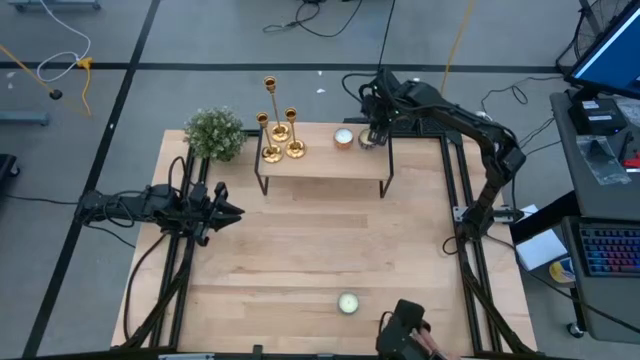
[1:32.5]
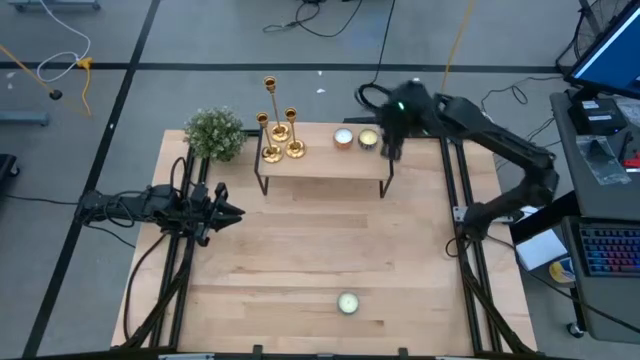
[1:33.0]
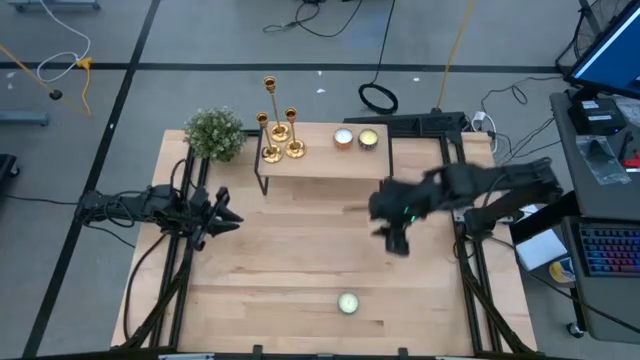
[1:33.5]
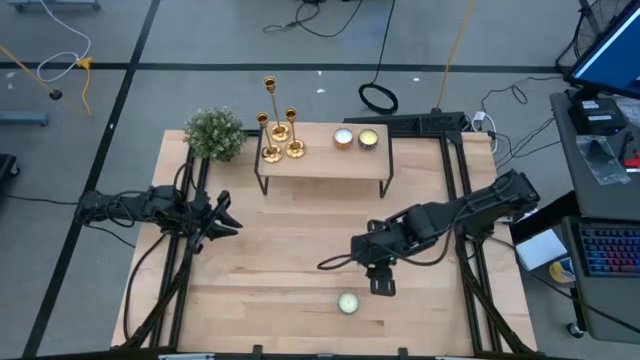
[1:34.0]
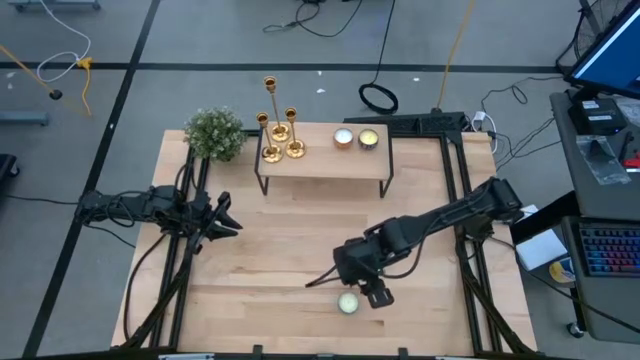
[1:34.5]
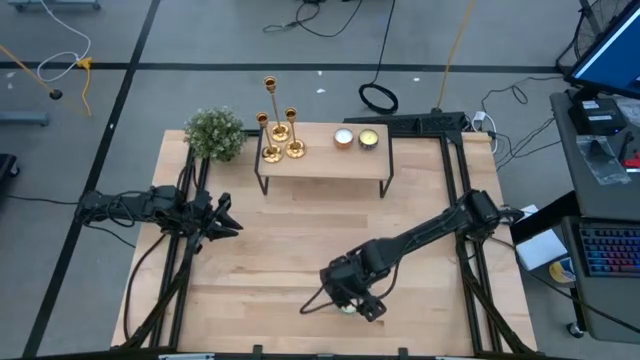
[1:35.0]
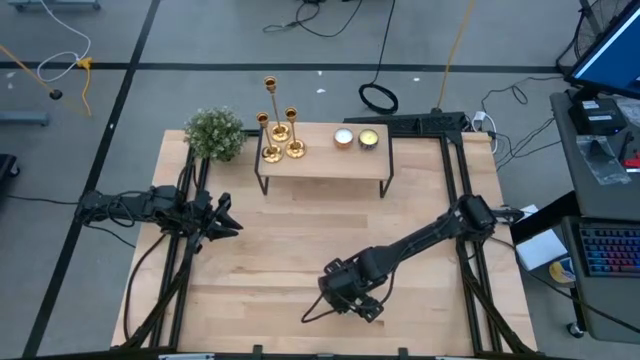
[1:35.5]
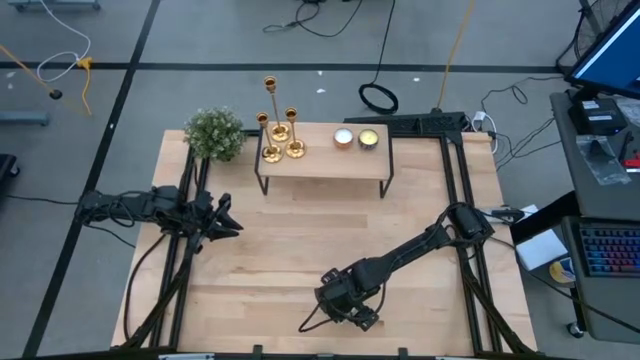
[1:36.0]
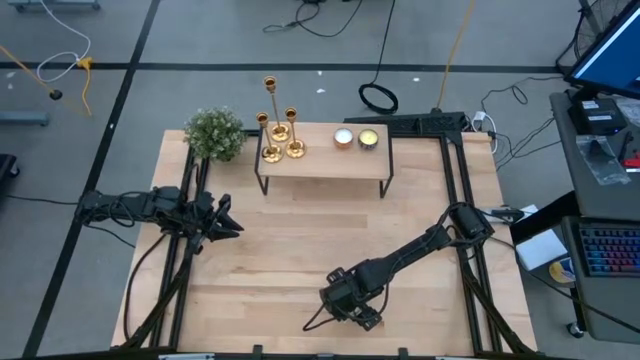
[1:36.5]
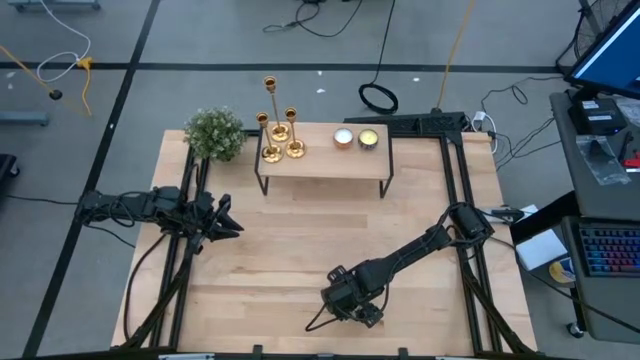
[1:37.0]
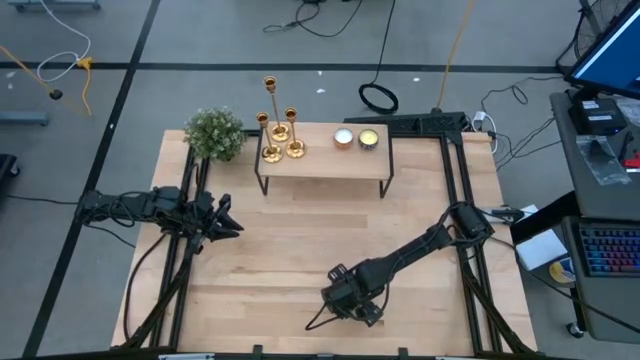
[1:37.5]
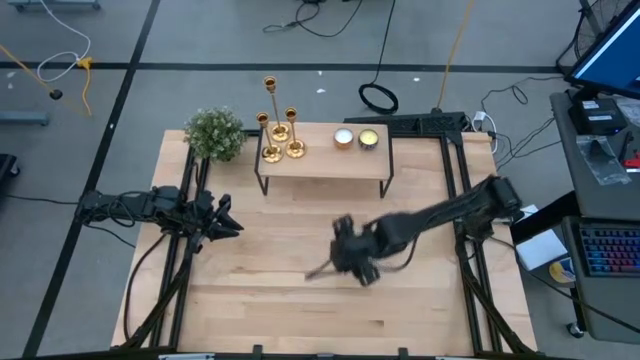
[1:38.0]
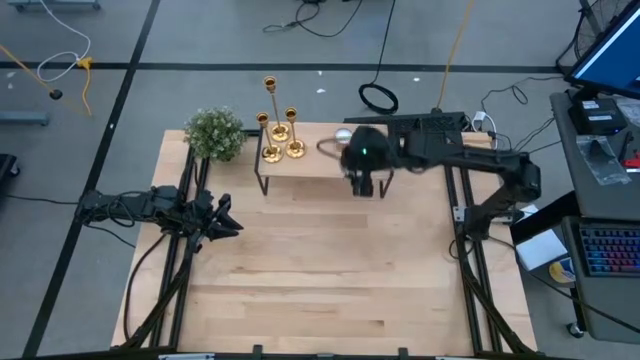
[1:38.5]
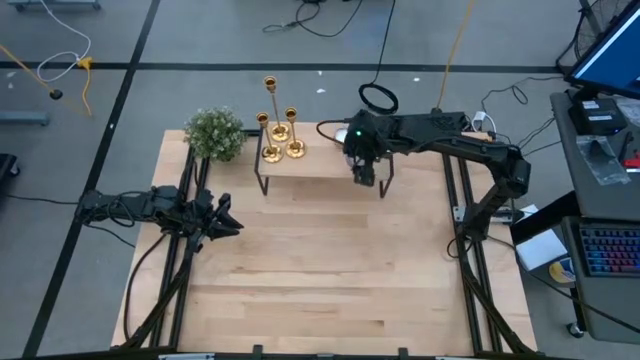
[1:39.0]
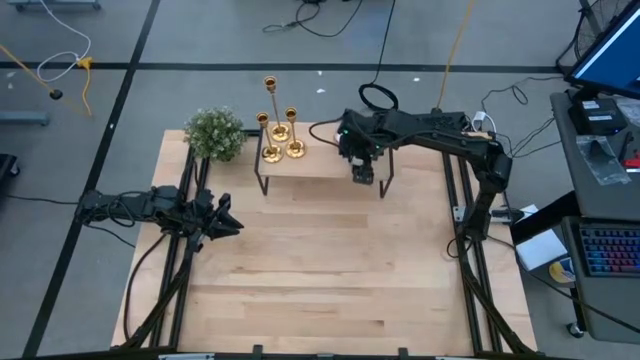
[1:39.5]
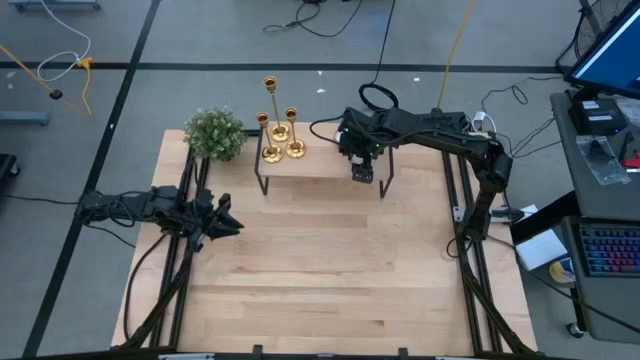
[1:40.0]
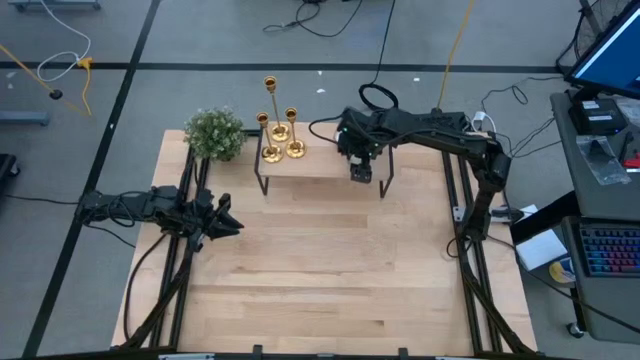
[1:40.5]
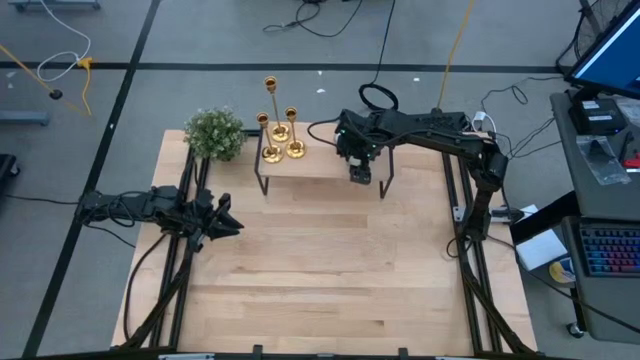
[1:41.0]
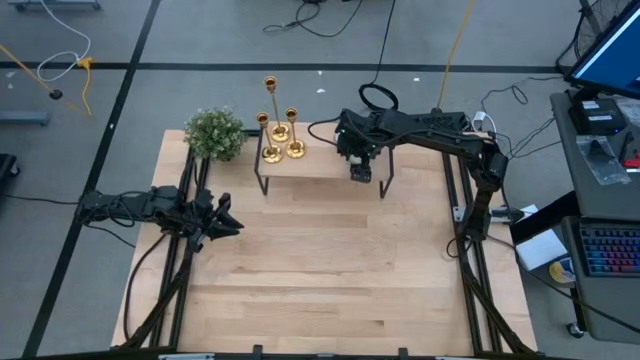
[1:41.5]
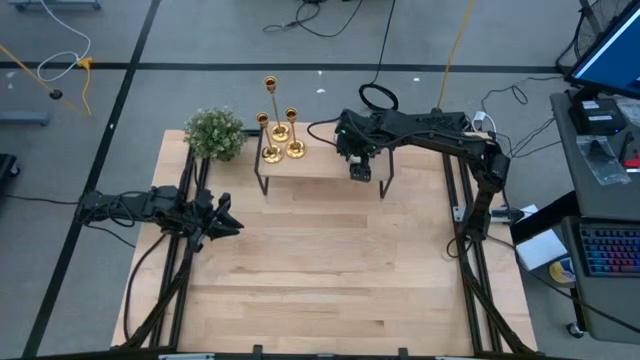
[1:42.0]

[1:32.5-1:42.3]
Task: Pick & Place candle stick holders
Put the blue scented candle on the shelf

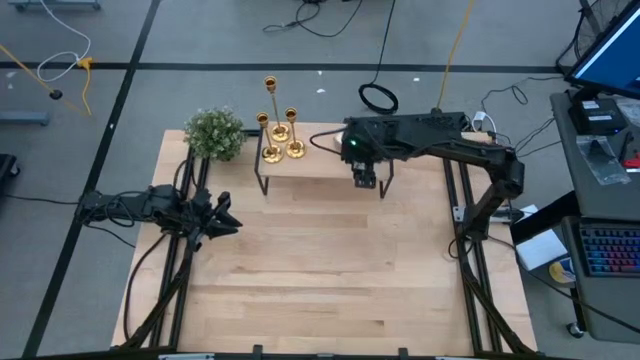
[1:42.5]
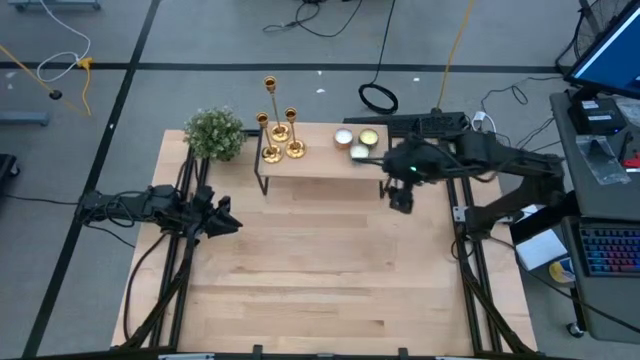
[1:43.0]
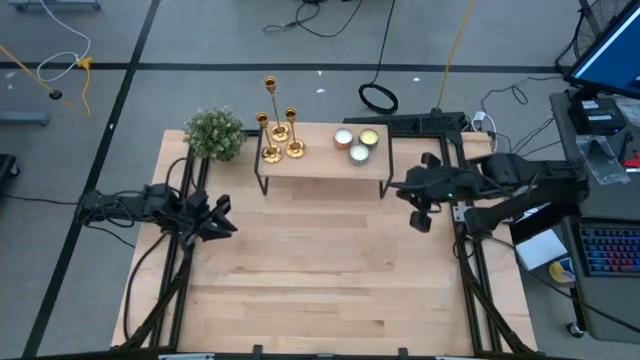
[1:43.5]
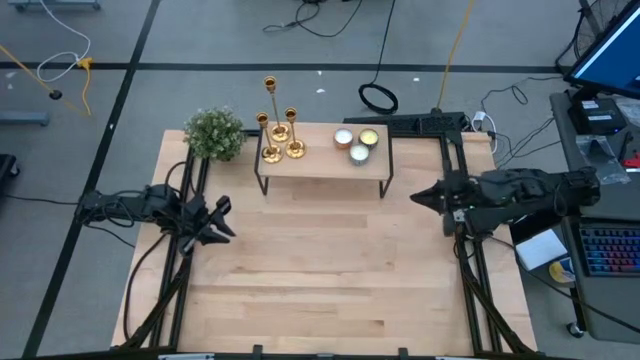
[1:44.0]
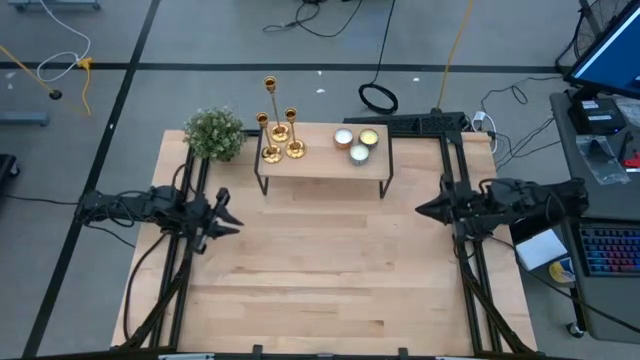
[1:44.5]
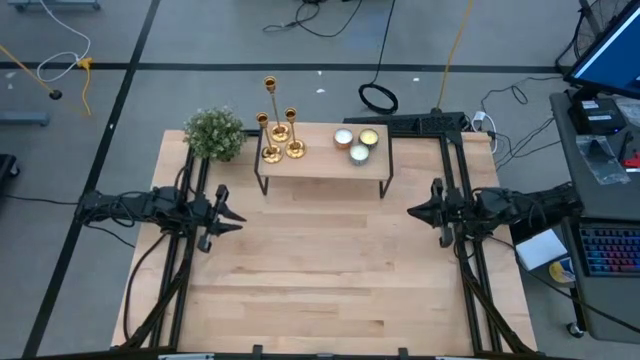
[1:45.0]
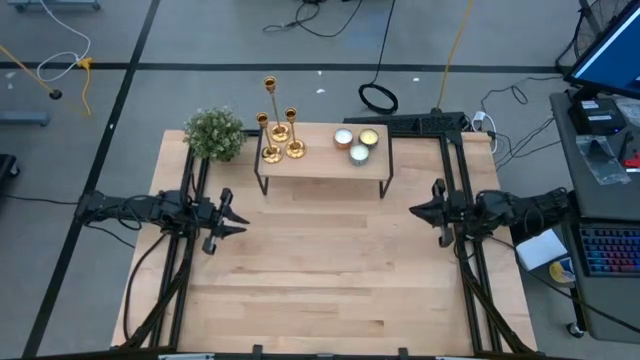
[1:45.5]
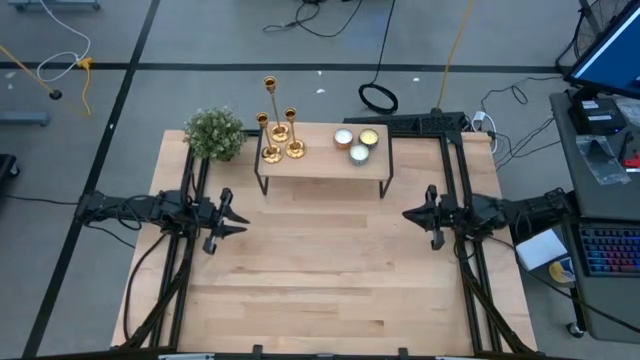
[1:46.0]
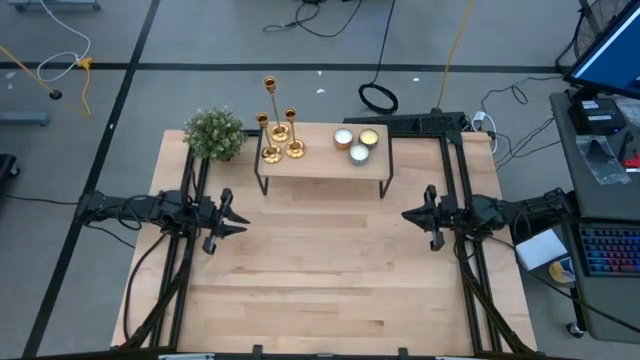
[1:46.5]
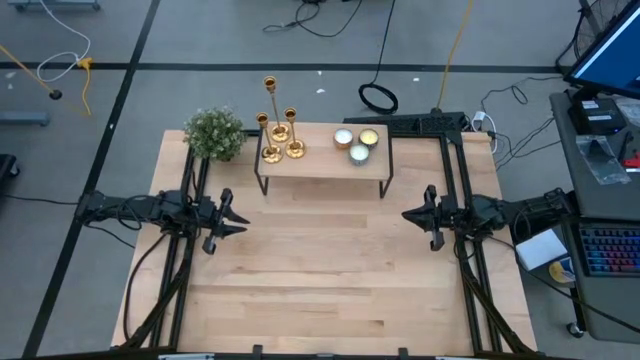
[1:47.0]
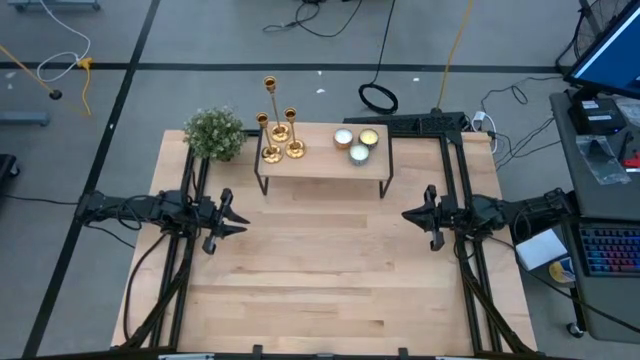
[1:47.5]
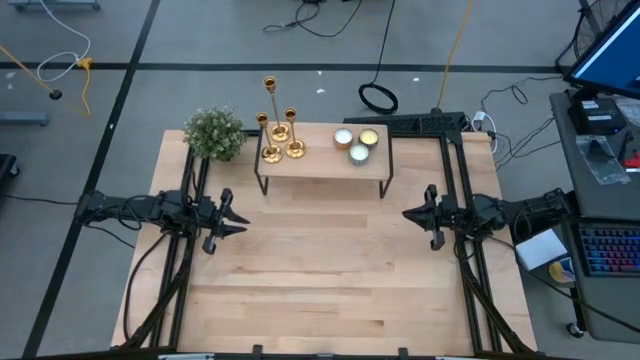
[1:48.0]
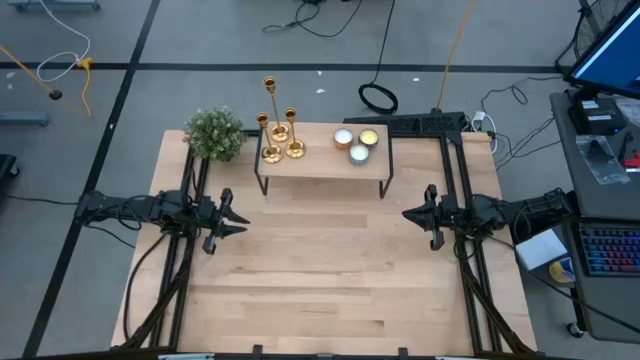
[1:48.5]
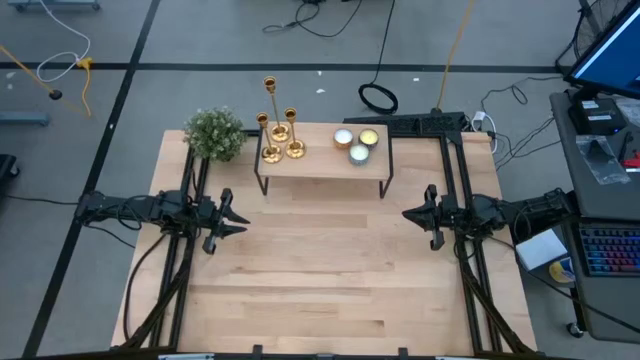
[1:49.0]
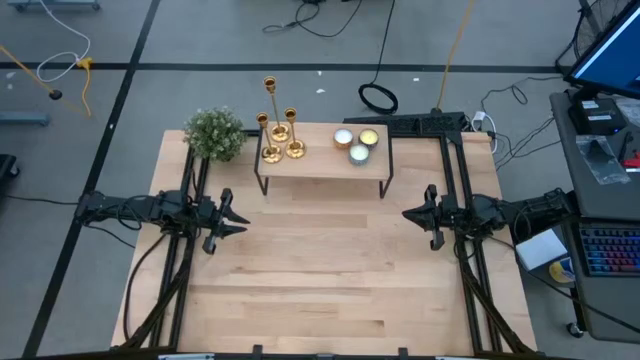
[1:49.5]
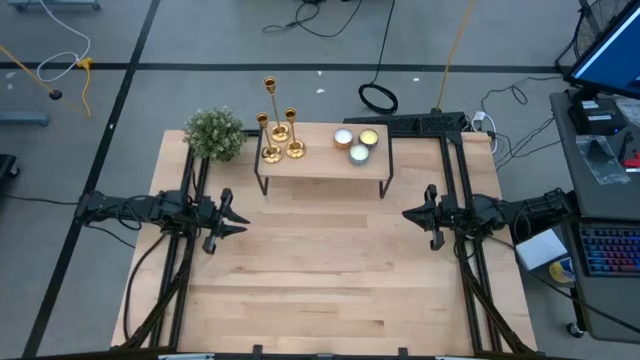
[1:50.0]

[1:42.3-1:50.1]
Return to Home Position
